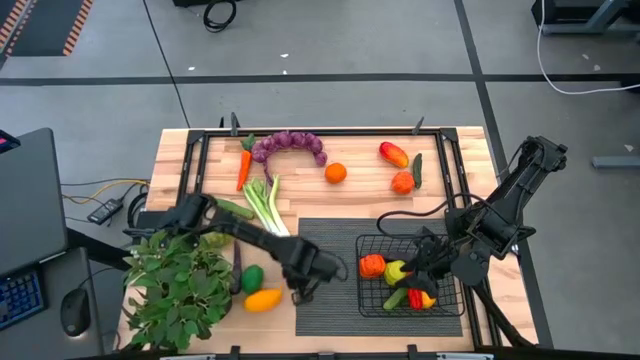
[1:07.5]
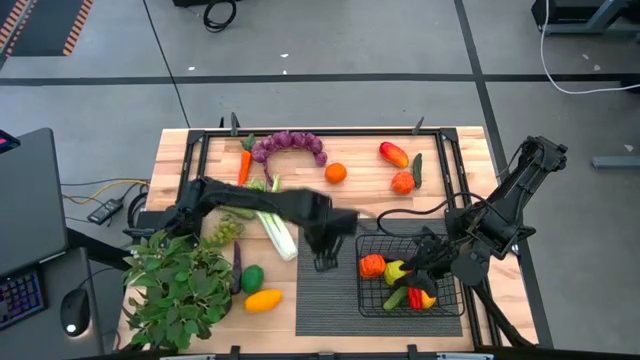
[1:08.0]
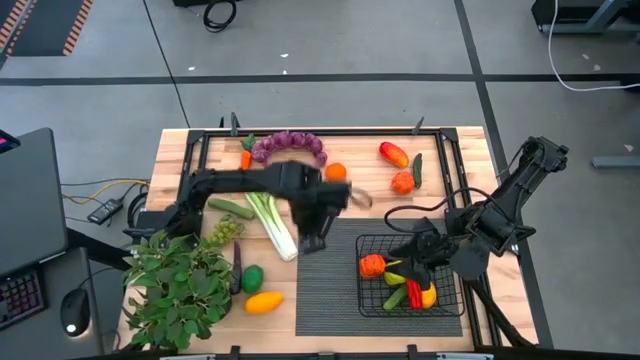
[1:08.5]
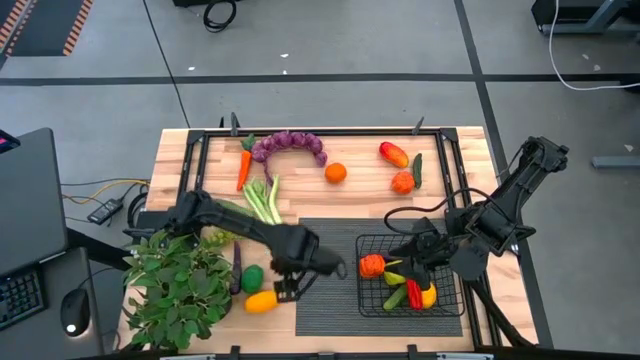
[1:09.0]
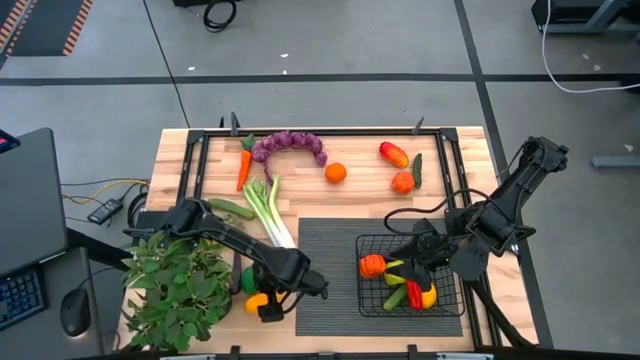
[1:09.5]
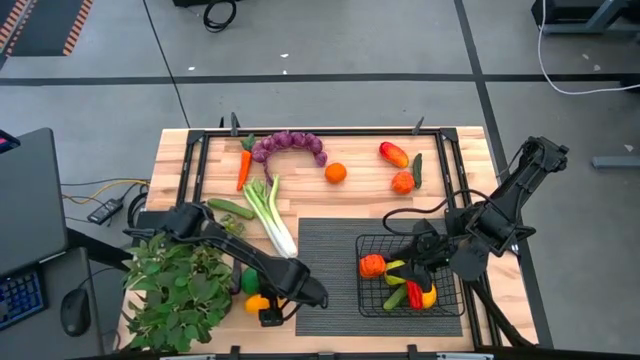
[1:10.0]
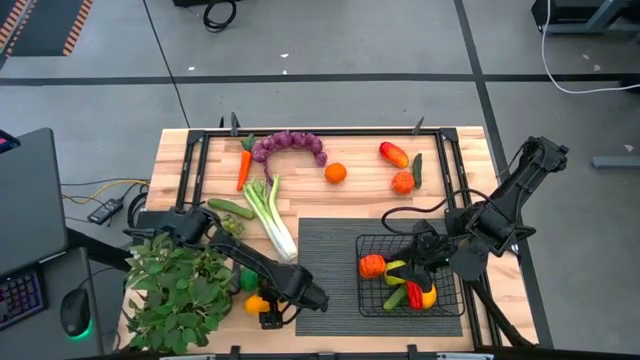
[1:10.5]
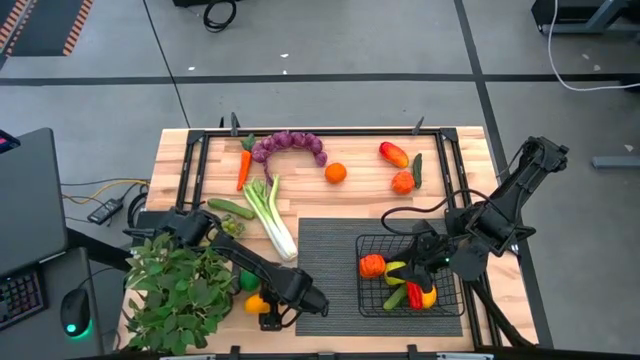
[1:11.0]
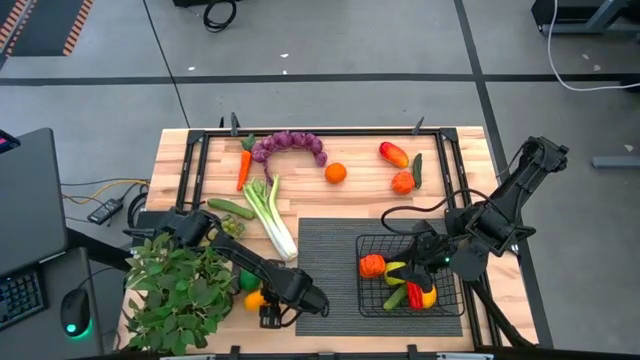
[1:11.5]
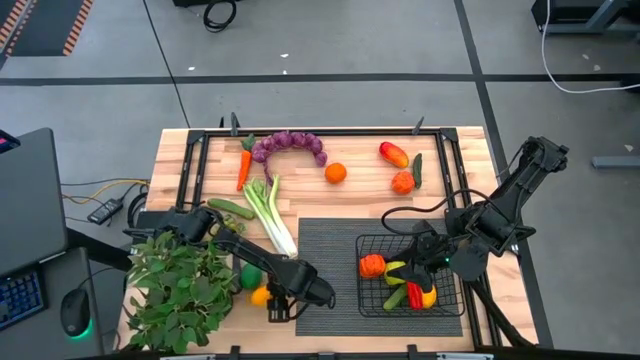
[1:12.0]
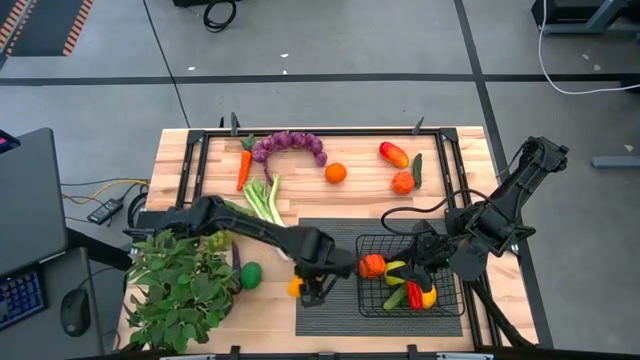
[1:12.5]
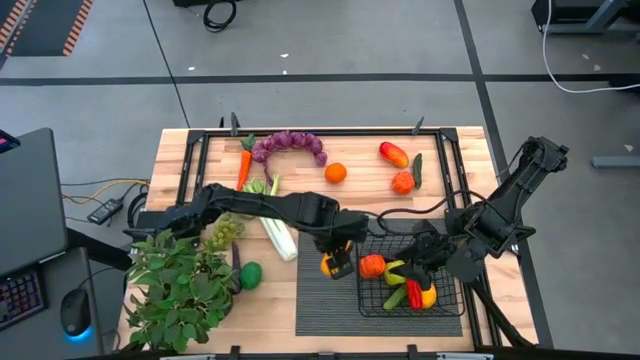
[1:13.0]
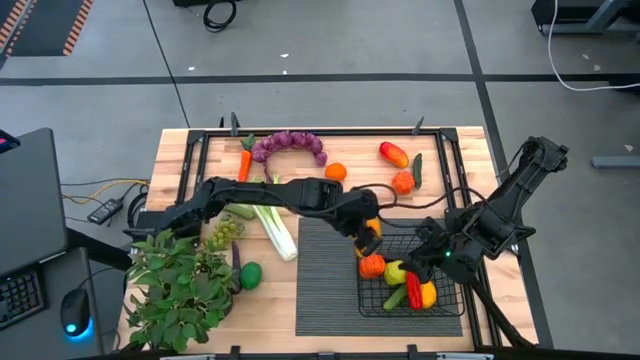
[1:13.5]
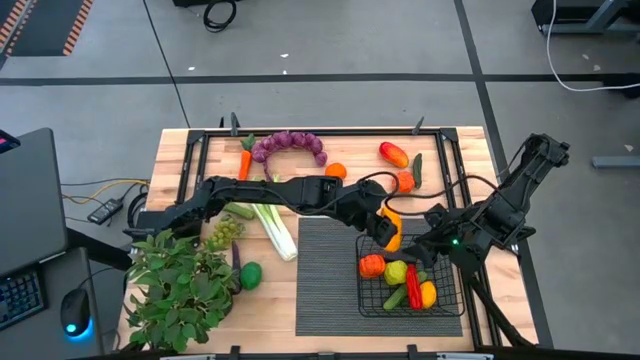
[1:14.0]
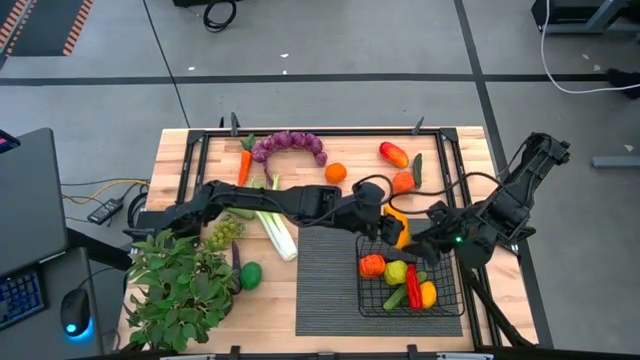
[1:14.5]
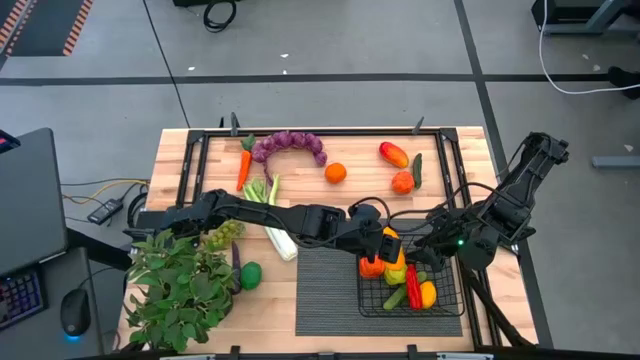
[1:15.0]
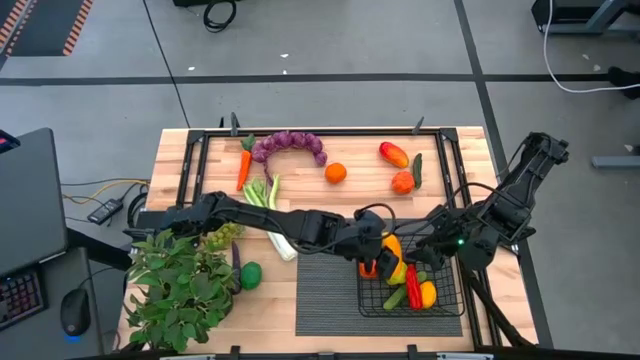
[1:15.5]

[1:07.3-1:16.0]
Task: Build produce basket
Put the bottom mango into the wire basket

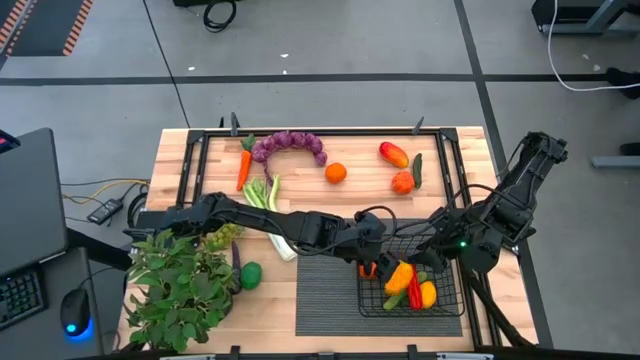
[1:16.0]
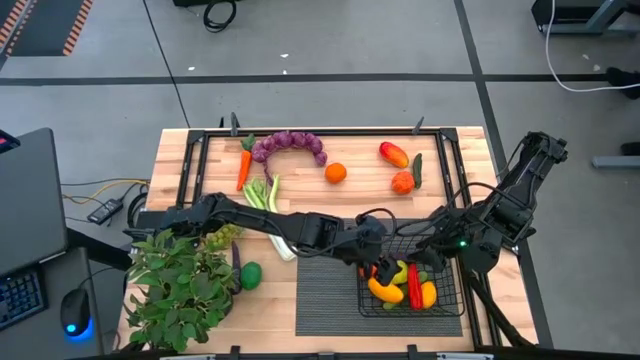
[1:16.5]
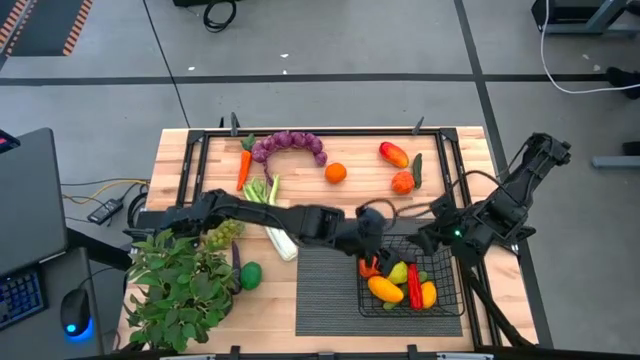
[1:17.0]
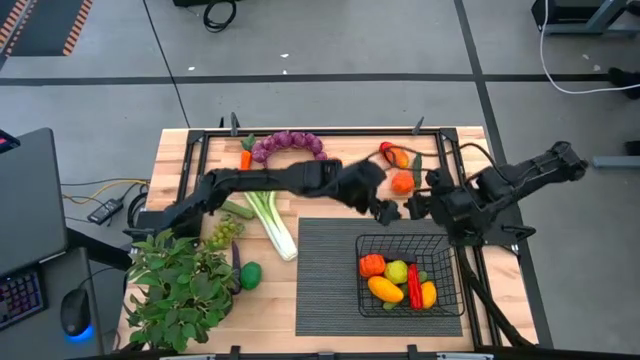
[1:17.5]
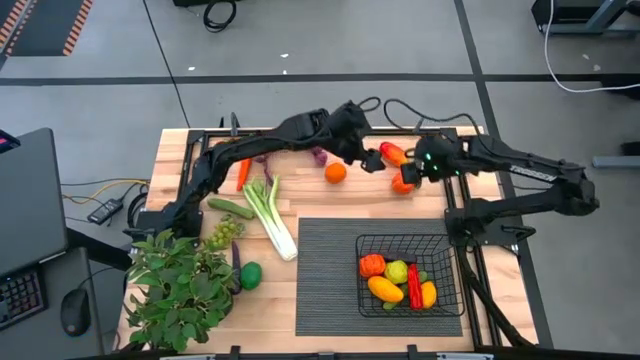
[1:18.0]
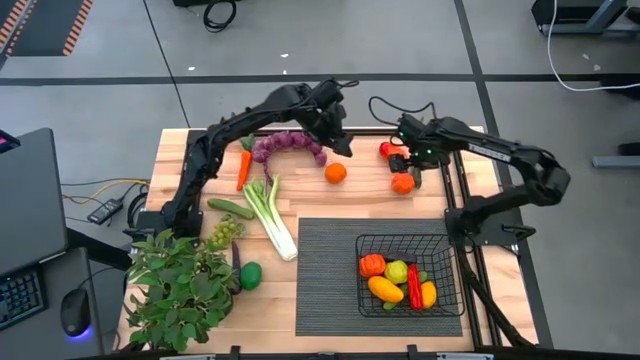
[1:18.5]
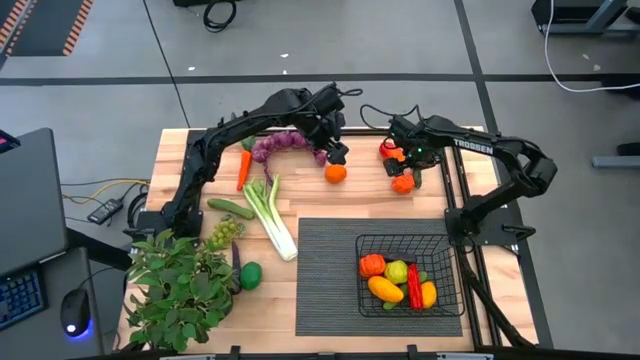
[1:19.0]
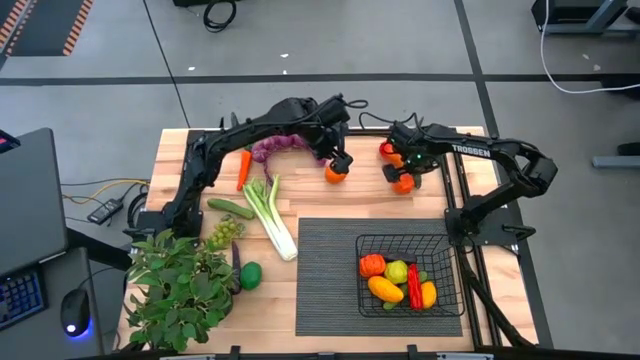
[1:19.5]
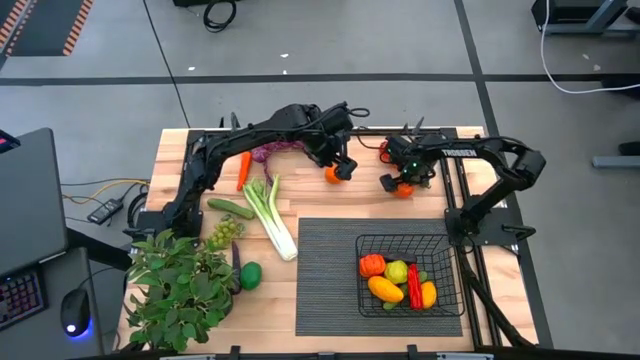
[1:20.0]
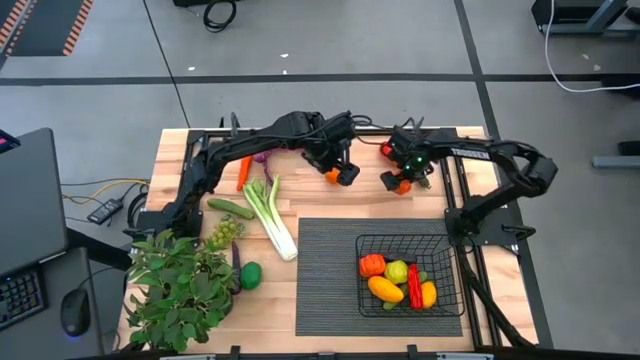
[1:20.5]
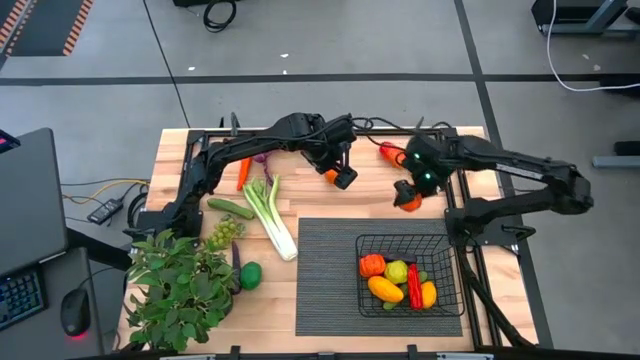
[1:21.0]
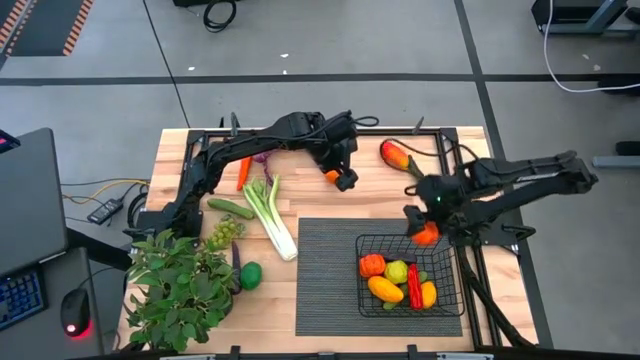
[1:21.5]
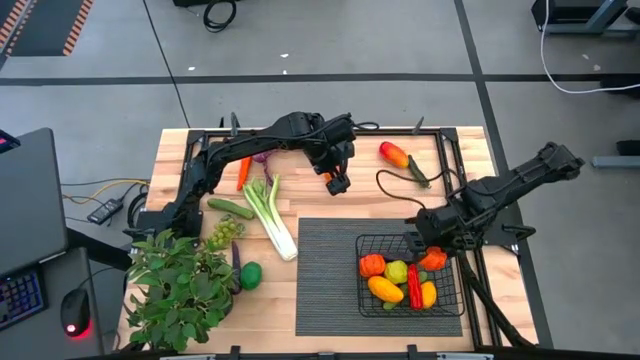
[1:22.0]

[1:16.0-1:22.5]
Put the tangerine into the wire basket

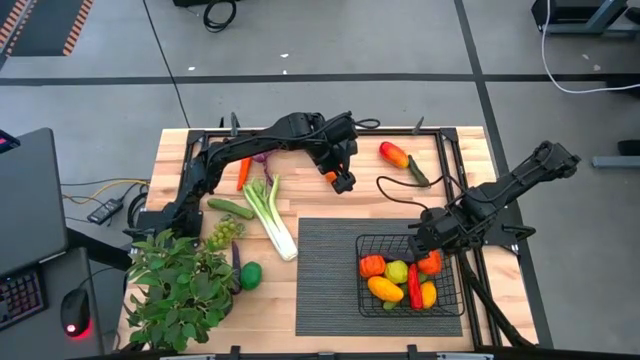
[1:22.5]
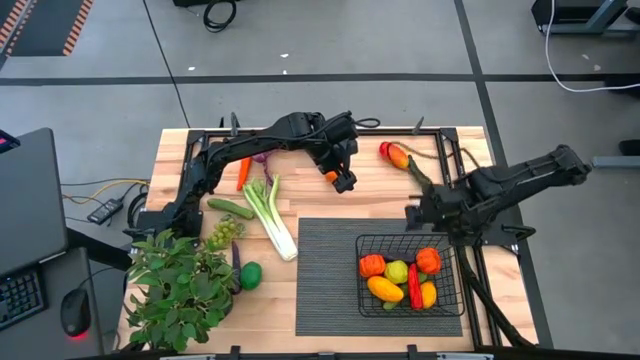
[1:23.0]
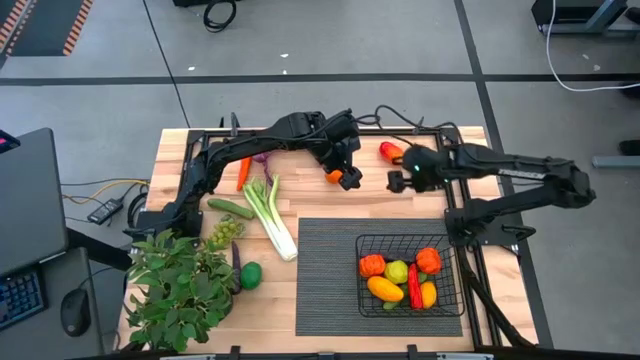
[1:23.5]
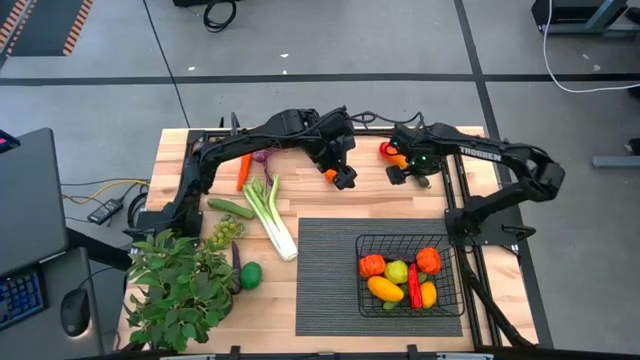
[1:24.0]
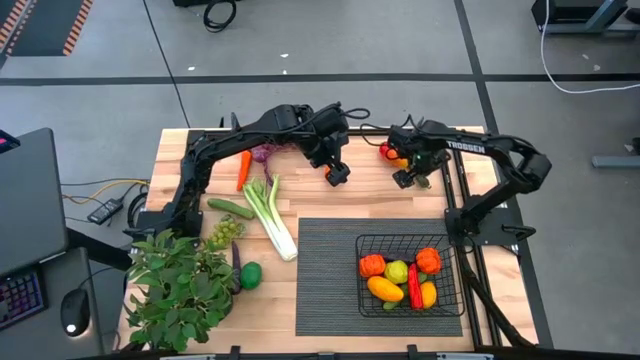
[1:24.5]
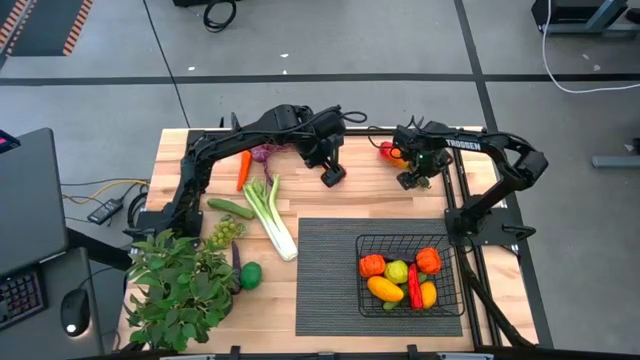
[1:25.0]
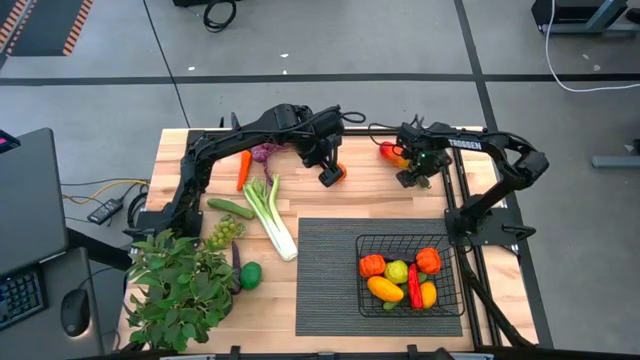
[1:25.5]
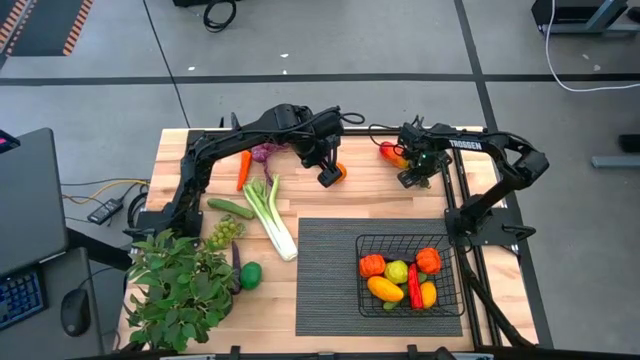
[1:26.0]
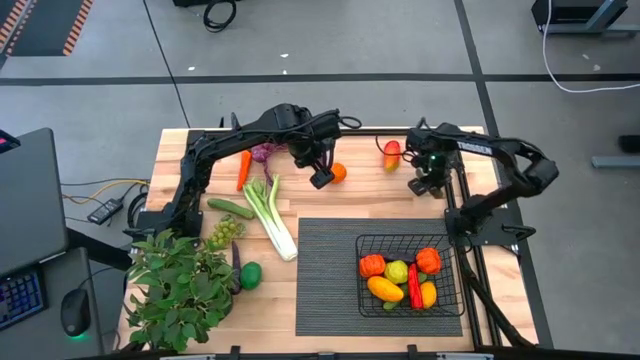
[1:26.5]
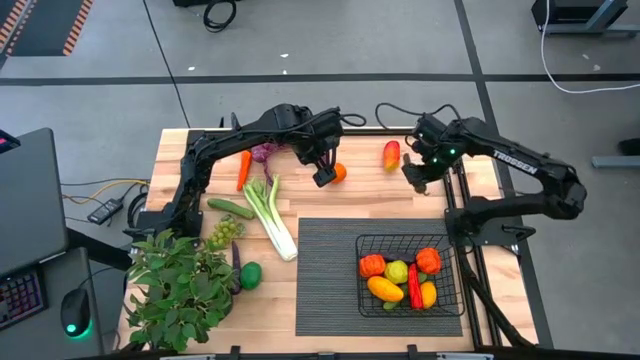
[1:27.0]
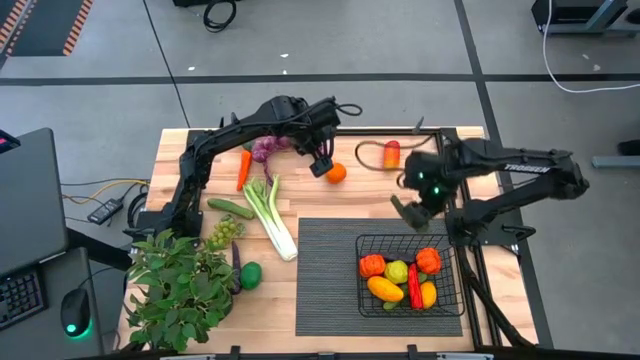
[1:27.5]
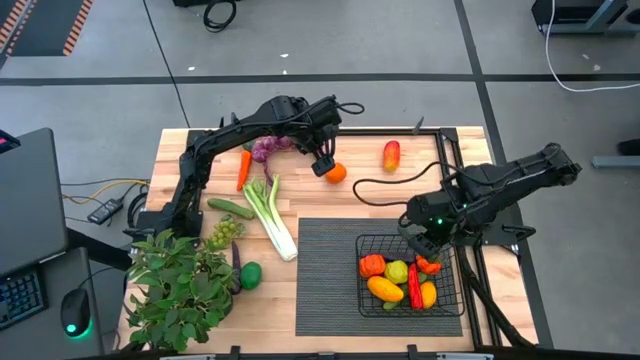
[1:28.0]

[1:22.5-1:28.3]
Put the green chili pepper into the wire basket

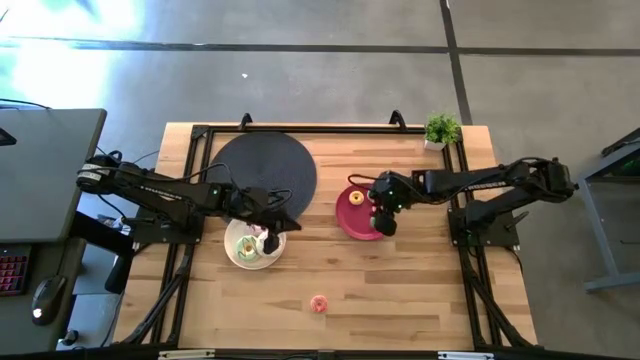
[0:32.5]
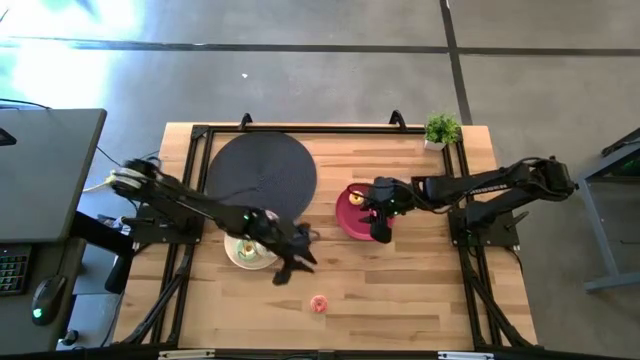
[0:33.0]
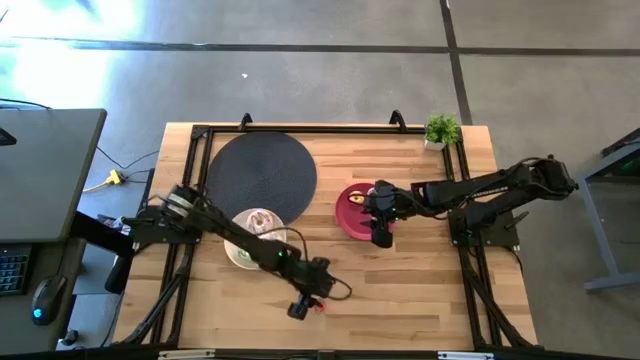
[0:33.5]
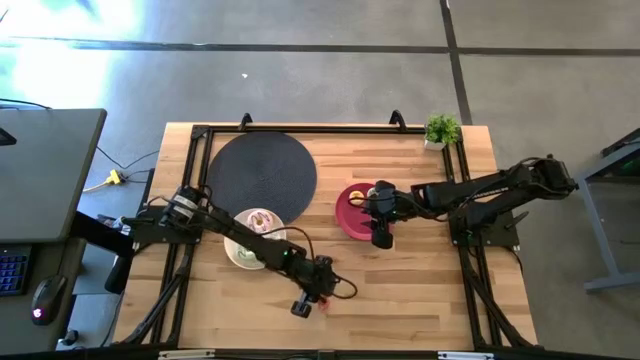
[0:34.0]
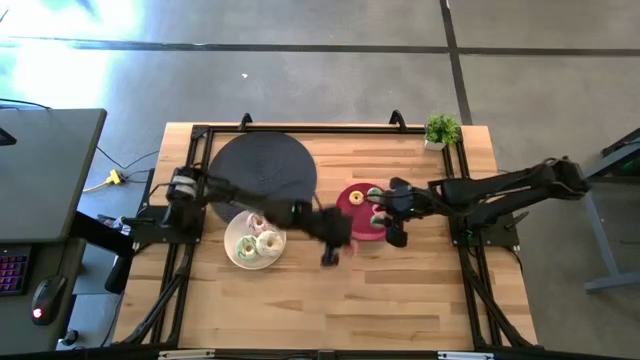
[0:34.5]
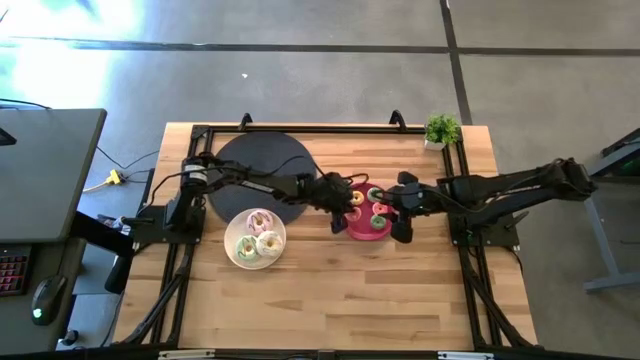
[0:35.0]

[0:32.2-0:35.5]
Task: Pick & Place donuts
Put the small pink donut on the red plate
